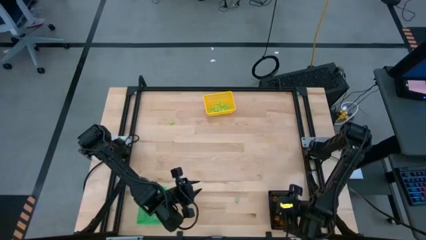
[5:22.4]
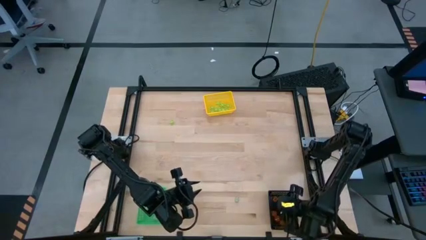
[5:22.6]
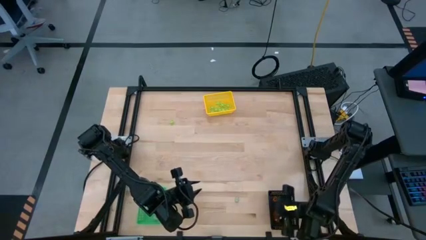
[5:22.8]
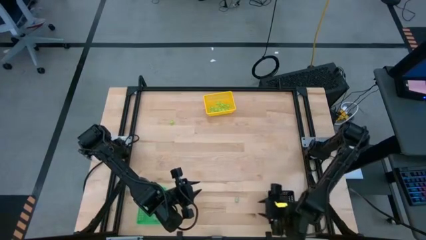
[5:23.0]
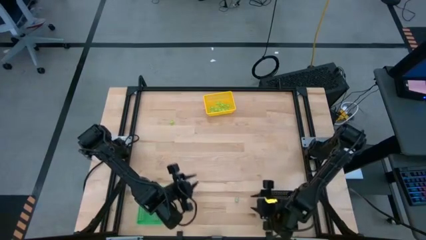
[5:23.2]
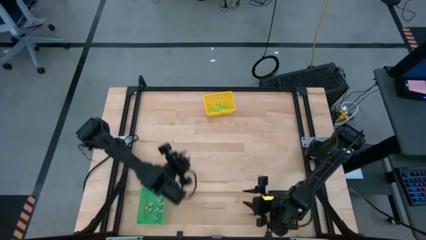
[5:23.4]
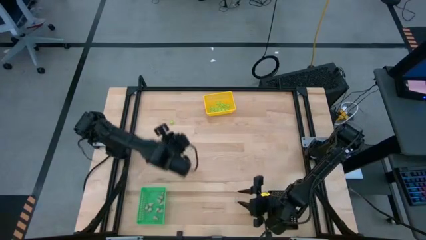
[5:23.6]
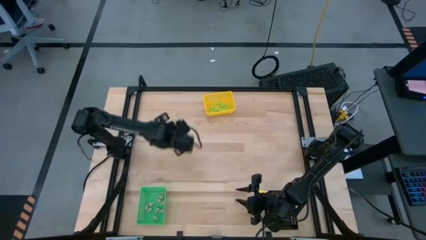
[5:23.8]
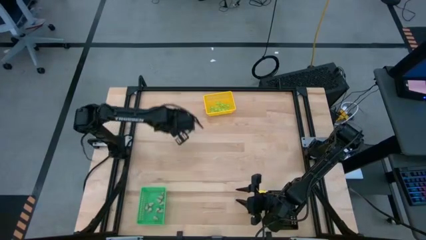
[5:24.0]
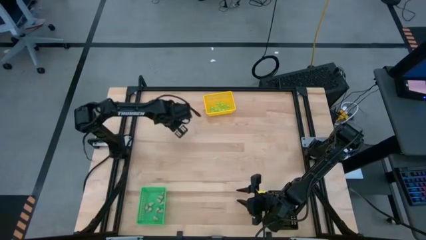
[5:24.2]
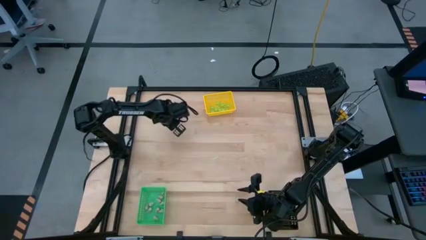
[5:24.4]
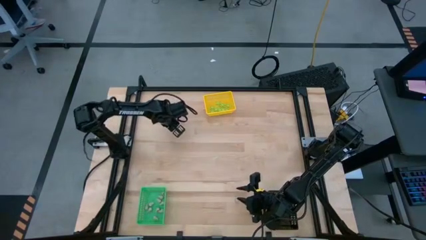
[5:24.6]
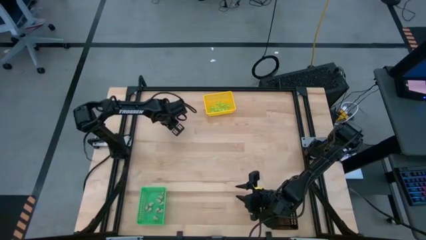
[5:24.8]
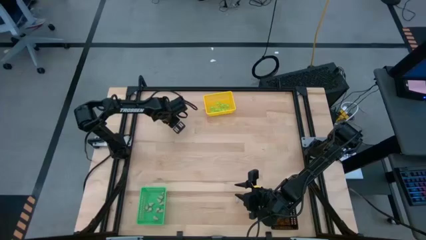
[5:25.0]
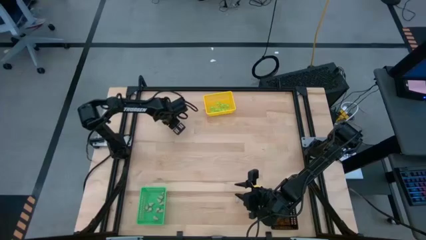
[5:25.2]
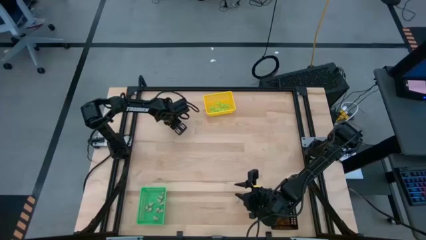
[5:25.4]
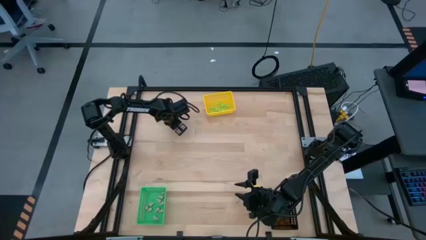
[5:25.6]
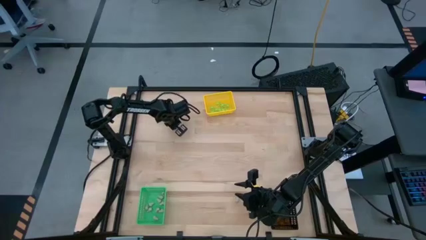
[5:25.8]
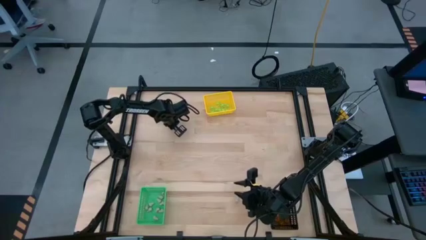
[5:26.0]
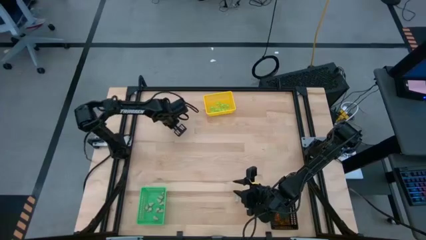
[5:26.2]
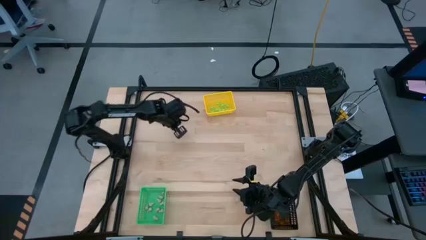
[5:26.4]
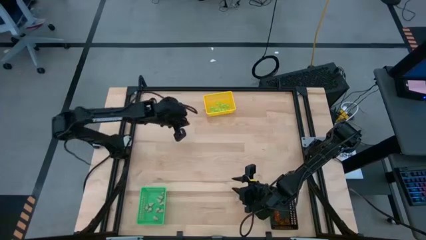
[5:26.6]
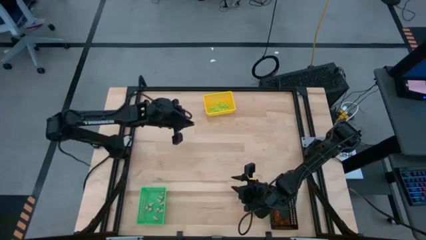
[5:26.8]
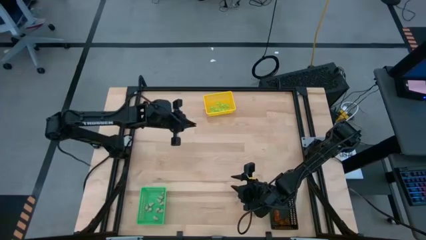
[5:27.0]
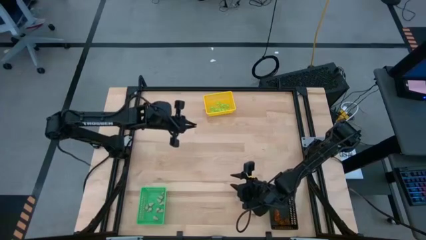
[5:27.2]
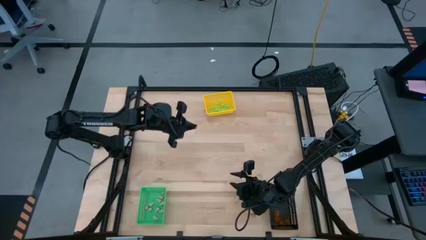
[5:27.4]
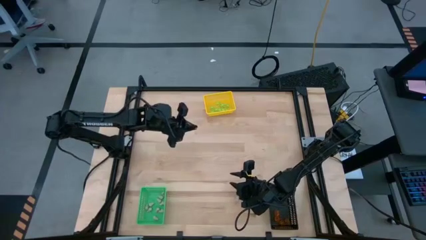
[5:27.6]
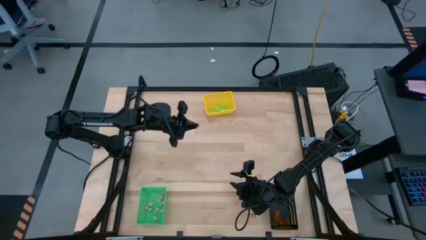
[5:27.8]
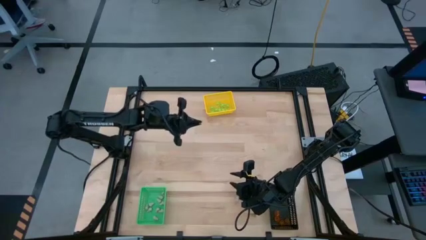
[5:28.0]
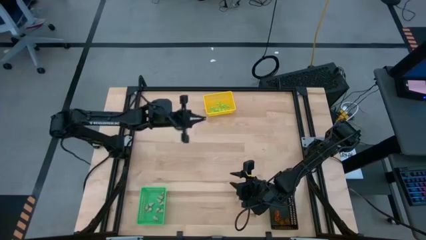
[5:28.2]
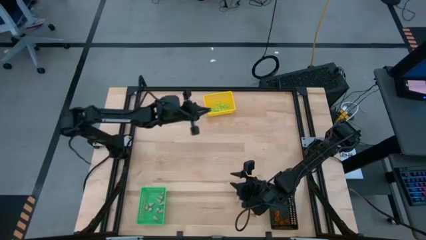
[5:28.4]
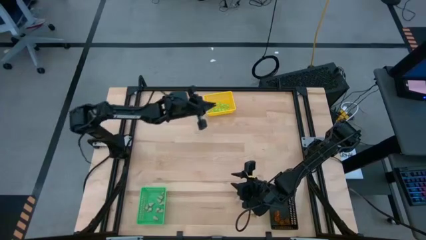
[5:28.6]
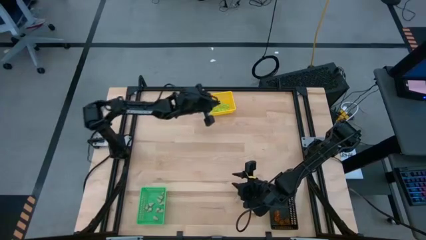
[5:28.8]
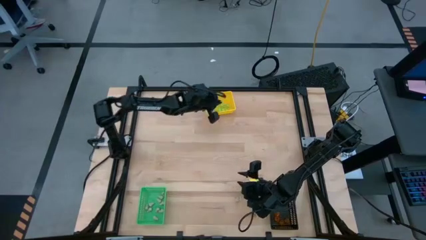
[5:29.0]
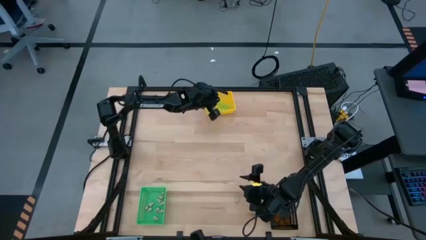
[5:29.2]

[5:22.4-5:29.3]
Task: Sort Halloween decoration
Put the green spider toy into the yellow bin

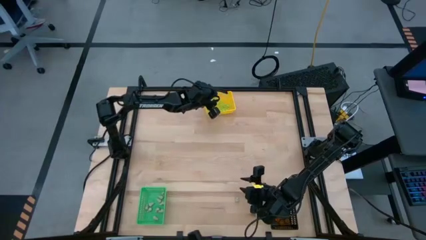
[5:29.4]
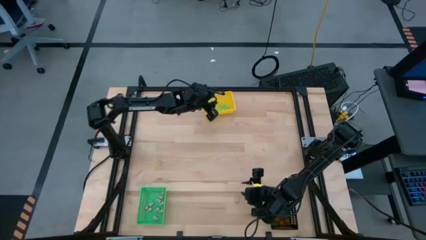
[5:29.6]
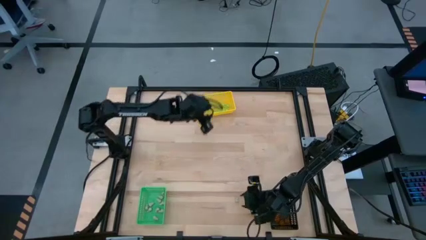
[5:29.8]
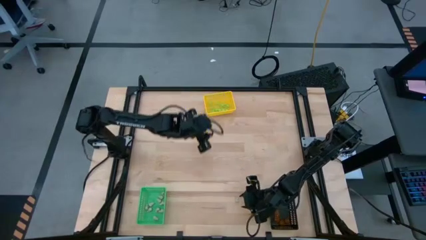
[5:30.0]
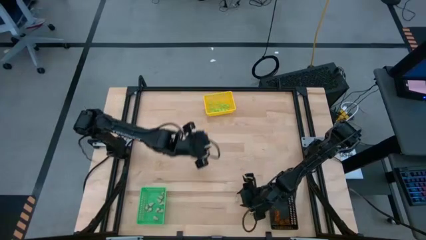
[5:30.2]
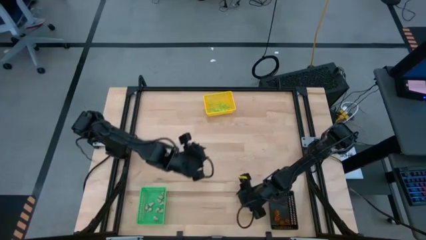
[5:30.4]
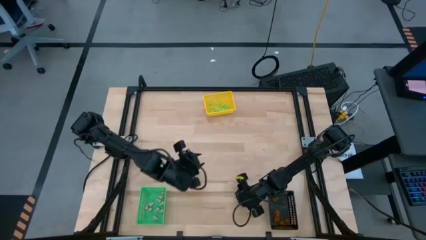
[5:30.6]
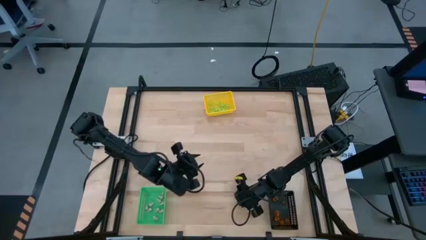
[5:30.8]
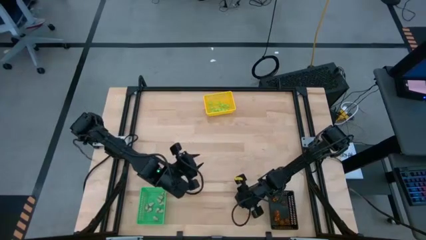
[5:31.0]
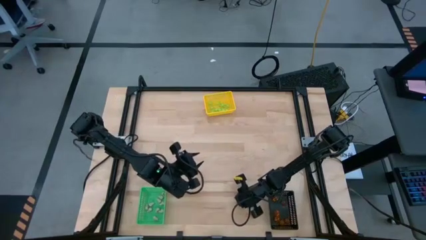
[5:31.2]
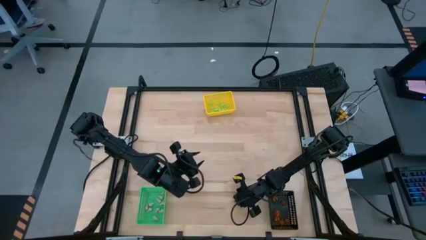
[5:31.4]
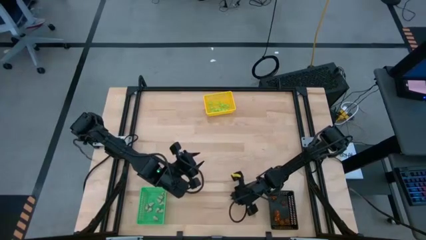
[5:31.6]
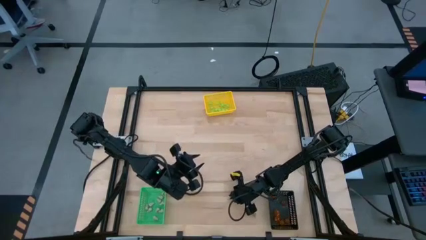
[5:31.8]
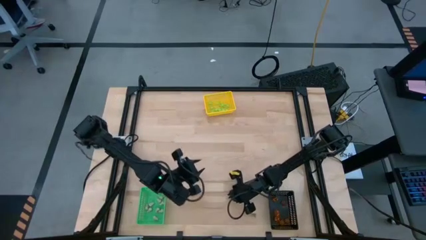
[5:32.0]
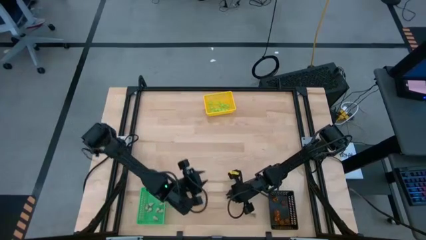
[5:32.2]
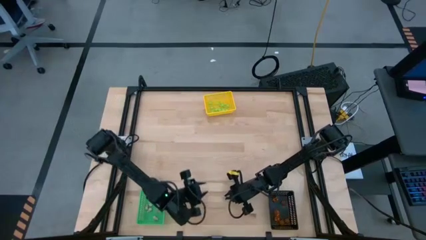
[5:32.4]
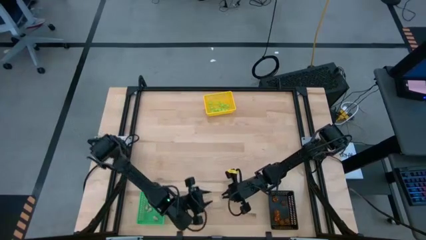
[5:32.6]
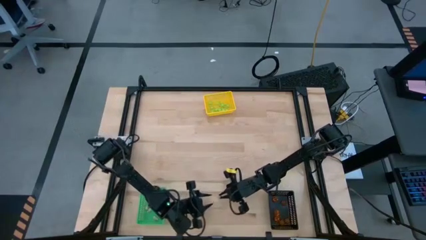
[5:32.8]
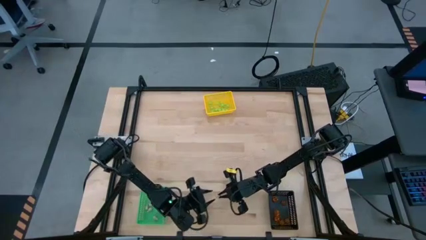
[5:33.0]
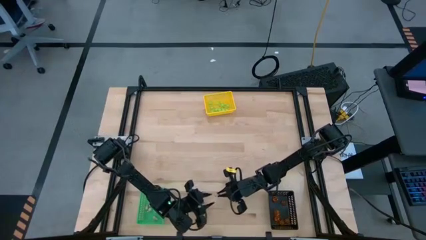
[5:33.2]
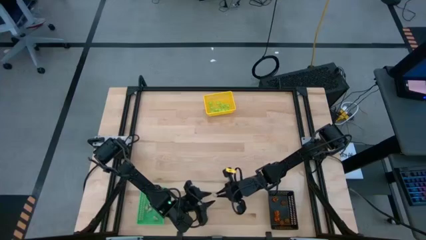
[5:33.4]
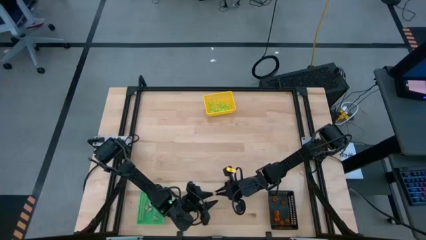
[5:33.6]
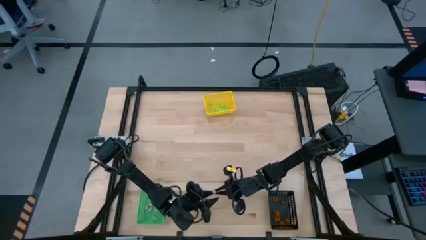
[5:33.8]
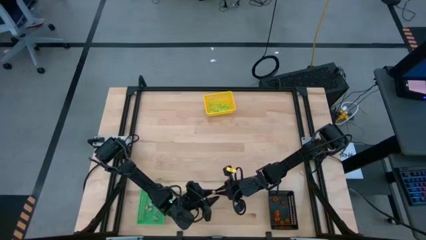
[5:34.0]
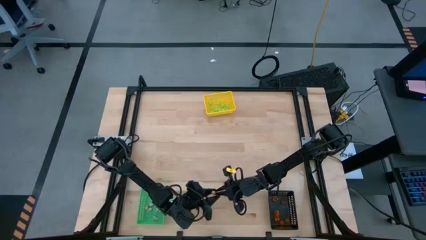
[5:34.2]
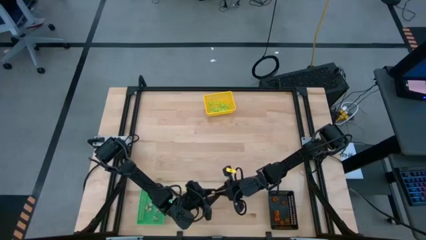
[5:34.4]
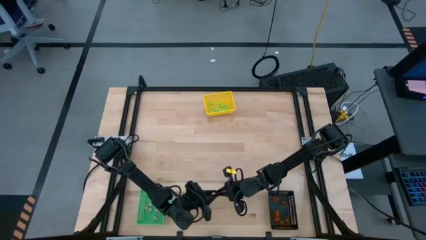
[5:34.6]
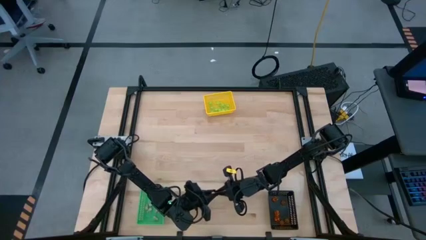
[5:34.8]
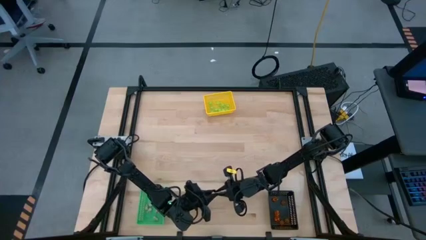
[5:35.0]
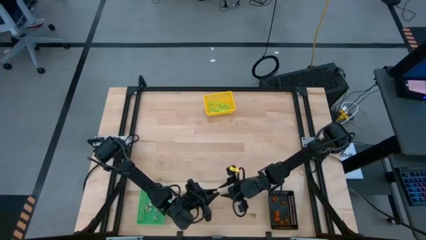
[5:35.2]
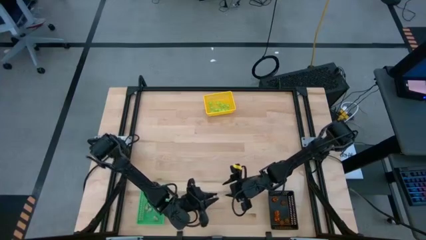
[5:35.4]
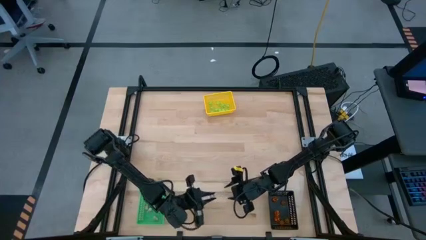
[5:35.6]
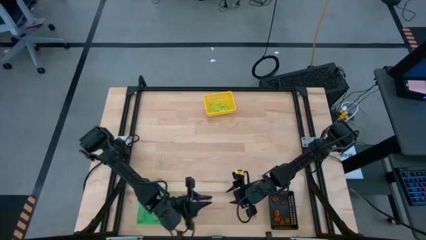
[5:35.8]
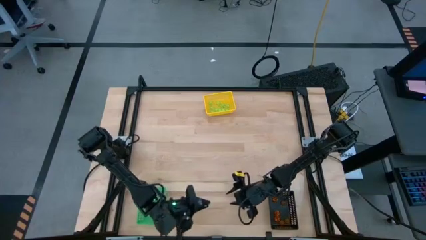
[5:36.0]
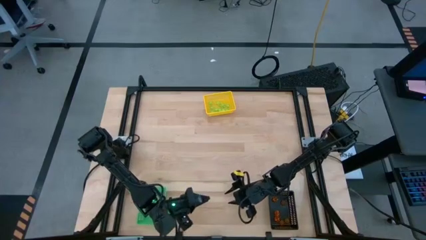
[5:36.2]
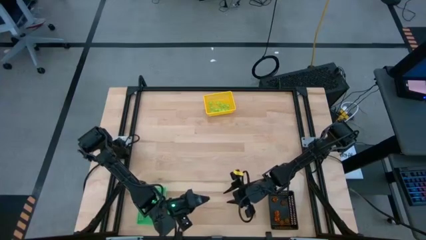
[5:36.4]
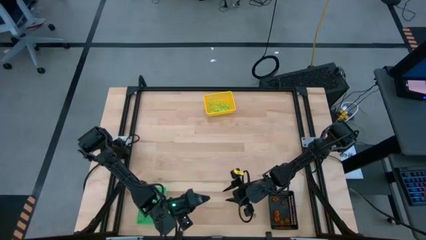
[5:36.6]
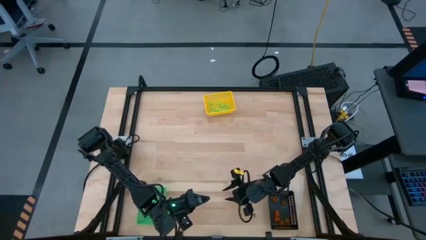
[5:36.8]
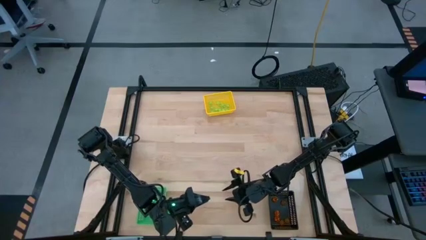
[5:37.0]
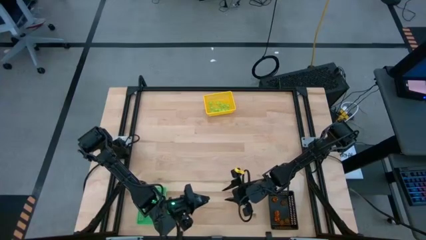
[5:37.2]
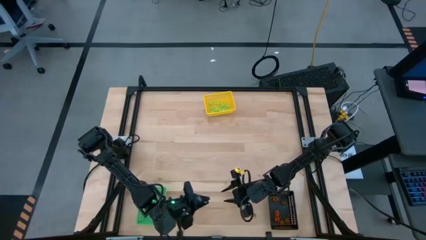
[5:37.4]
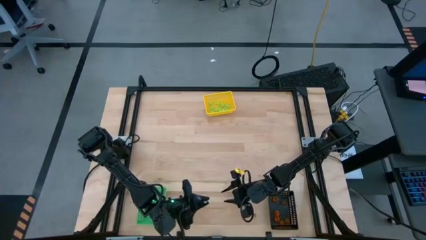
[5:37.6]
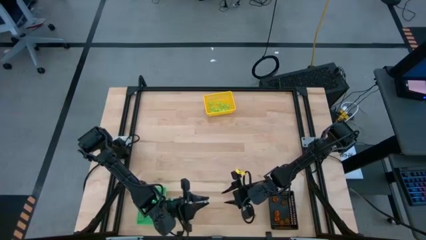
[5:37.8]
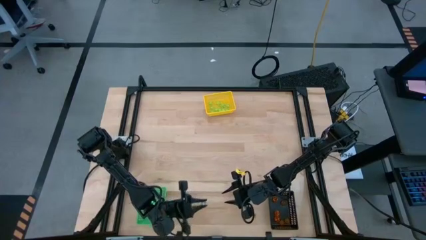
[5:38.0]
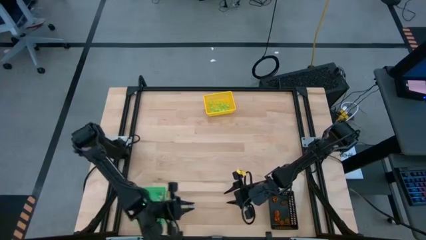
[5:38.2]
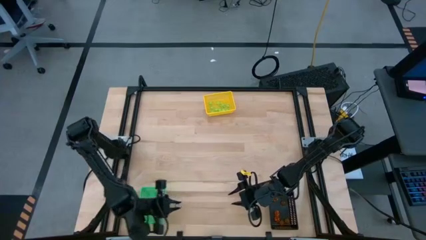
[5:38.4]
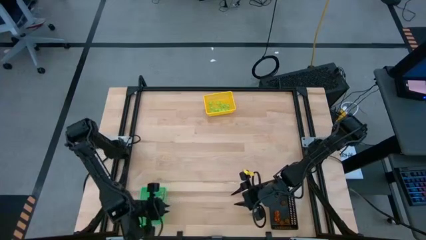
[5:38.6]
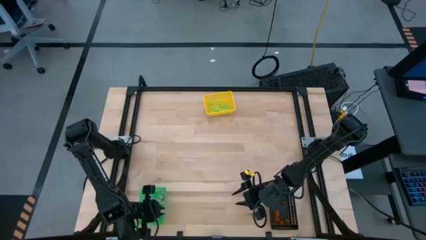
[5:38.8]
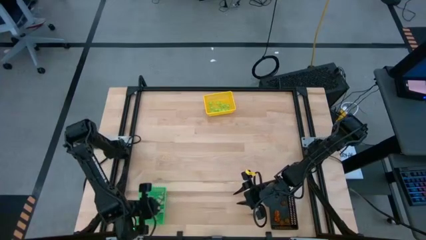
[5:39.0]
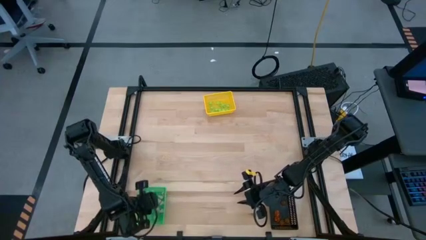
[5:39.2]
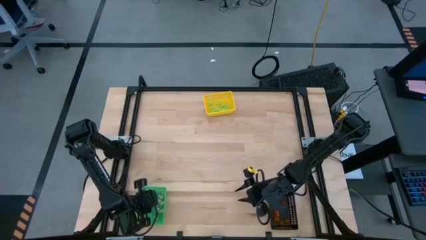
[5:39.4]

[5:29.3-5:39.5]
Put the white skull toy into the green bin
